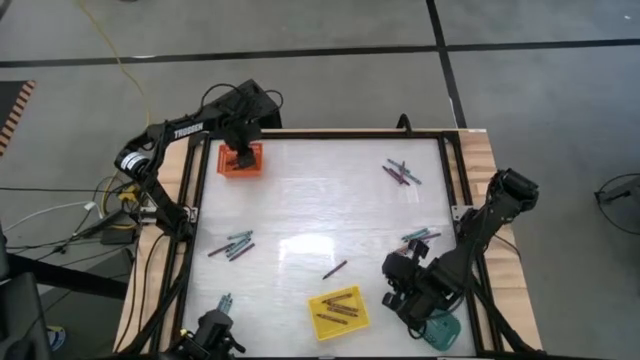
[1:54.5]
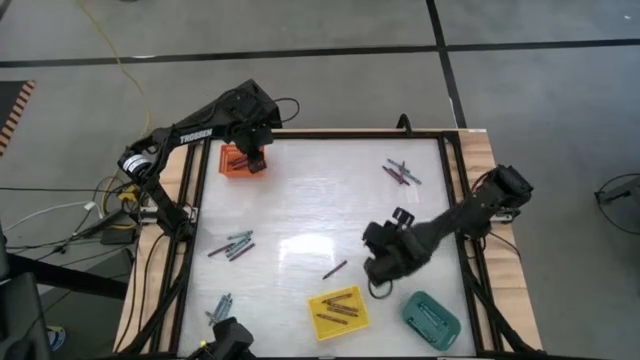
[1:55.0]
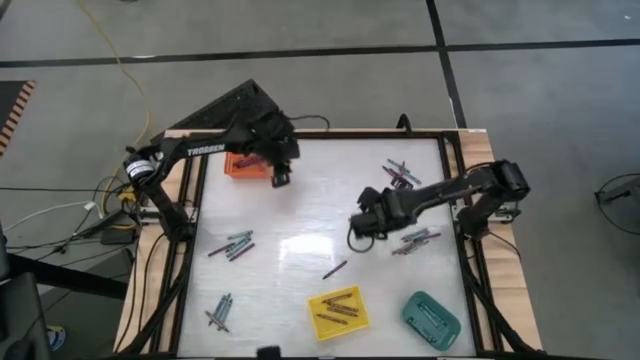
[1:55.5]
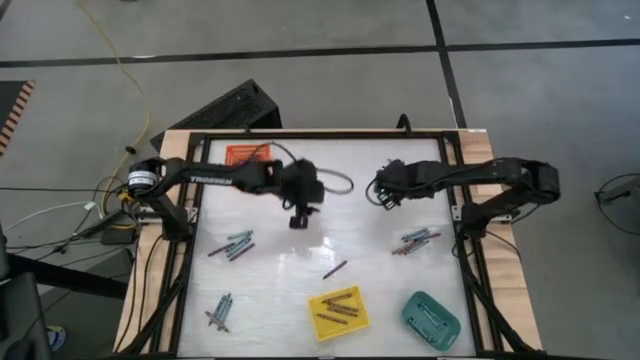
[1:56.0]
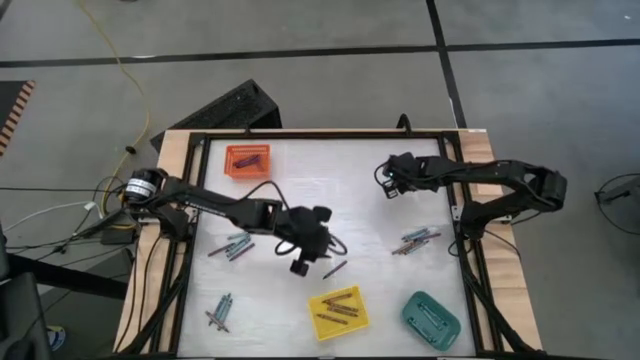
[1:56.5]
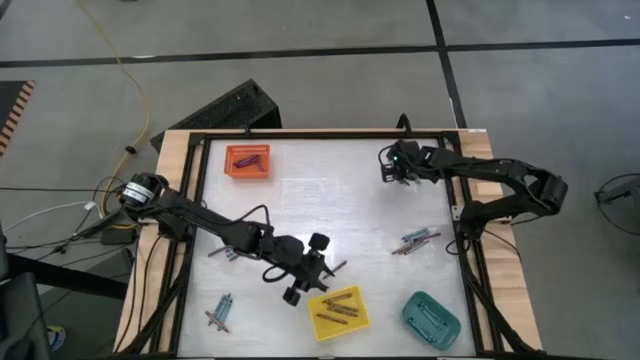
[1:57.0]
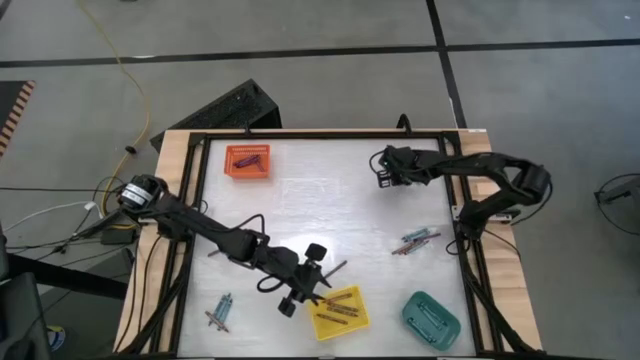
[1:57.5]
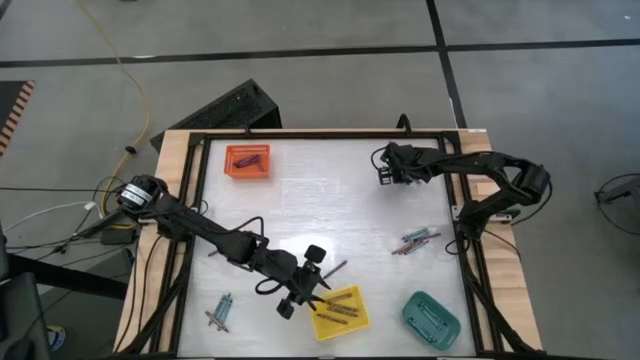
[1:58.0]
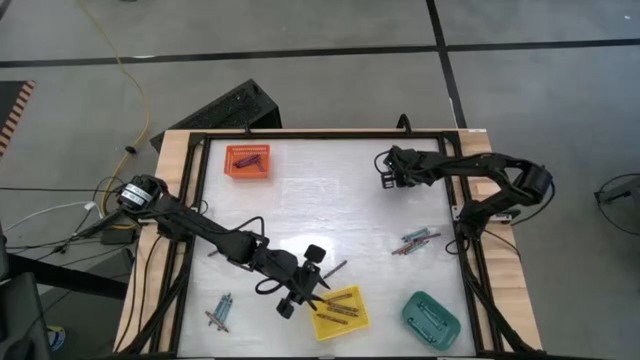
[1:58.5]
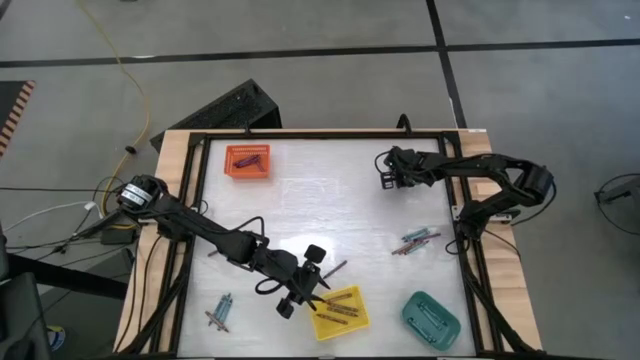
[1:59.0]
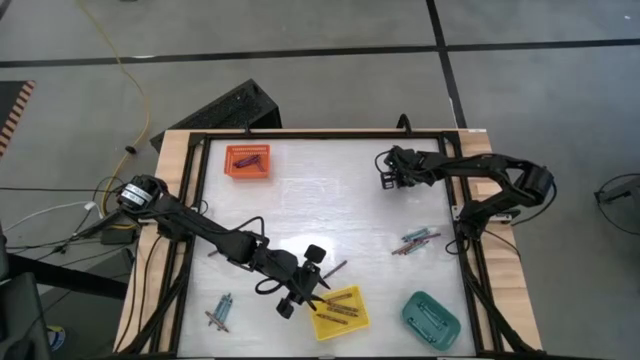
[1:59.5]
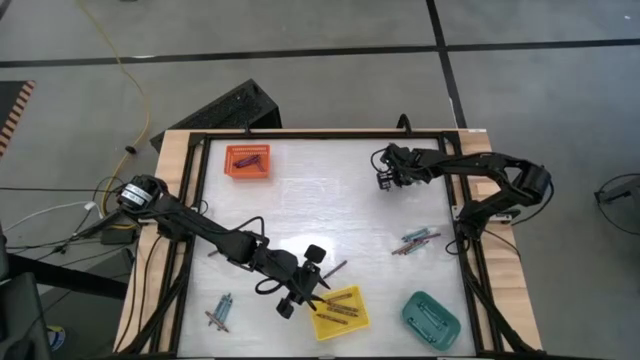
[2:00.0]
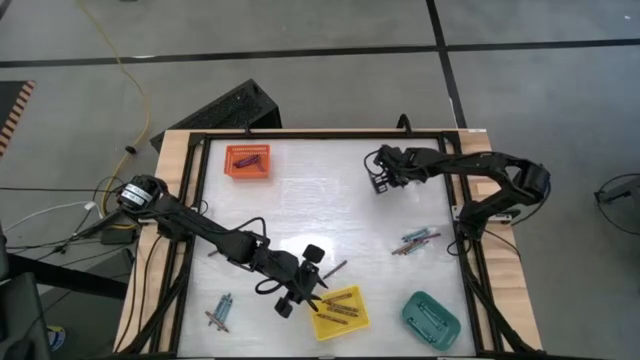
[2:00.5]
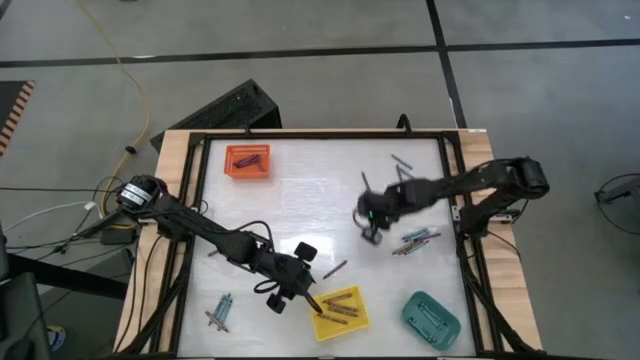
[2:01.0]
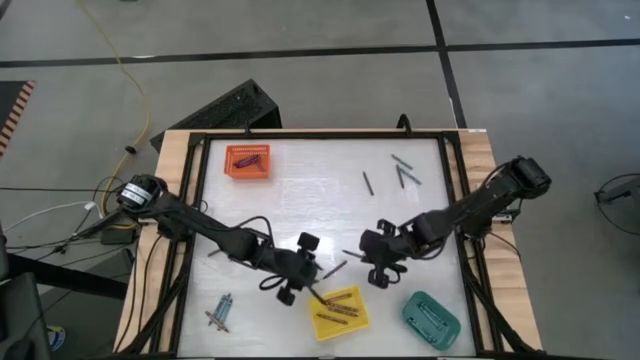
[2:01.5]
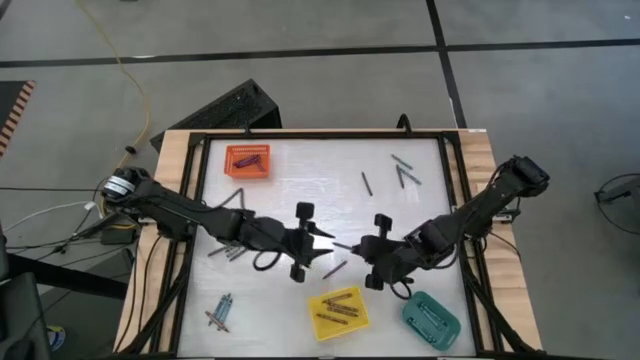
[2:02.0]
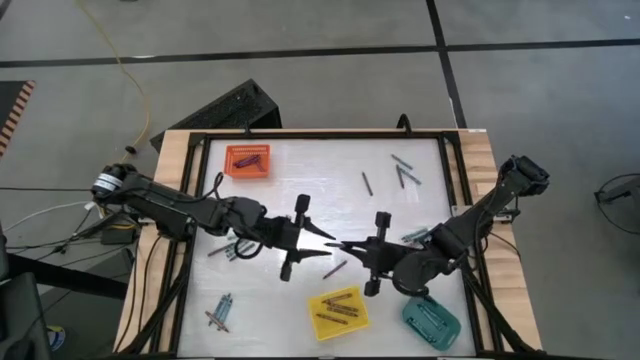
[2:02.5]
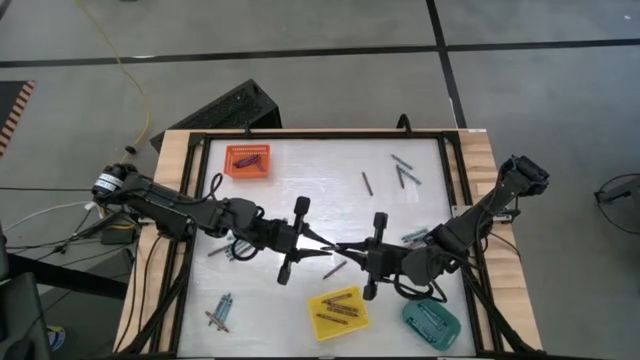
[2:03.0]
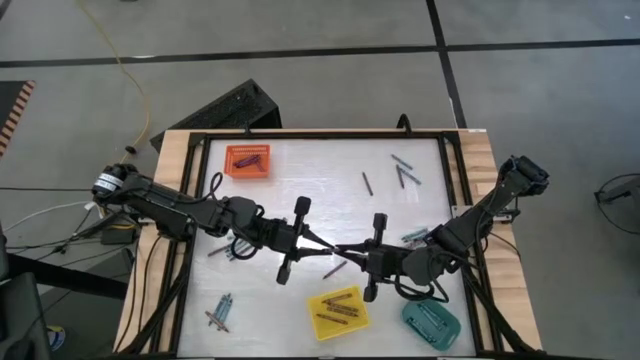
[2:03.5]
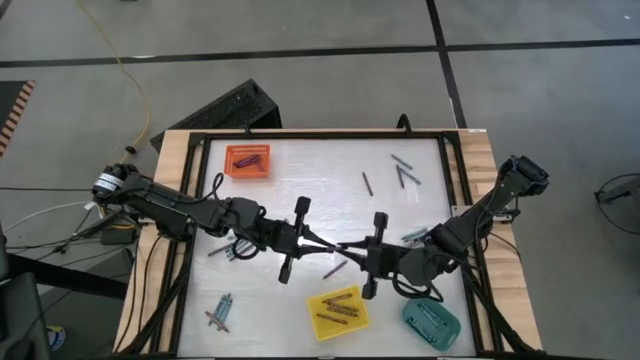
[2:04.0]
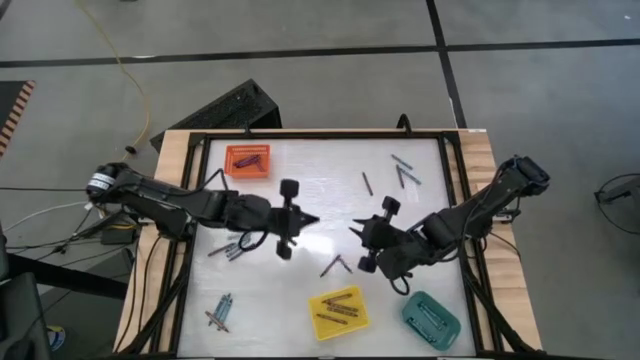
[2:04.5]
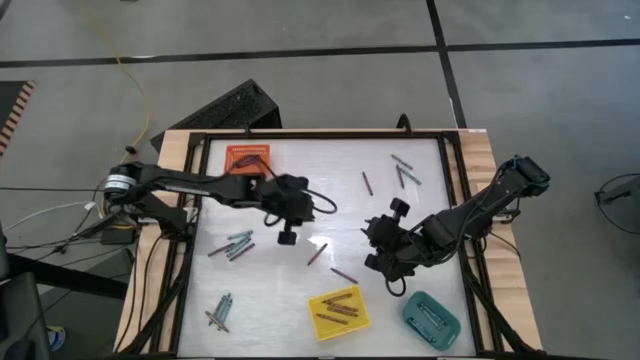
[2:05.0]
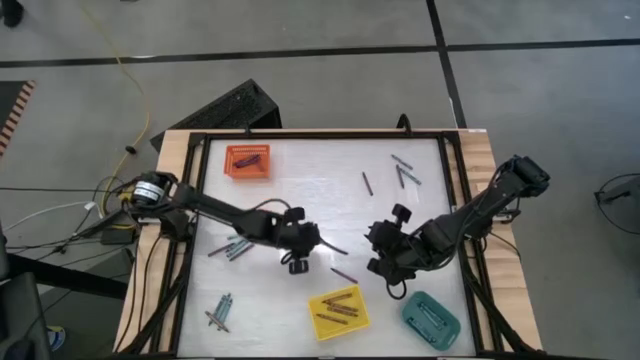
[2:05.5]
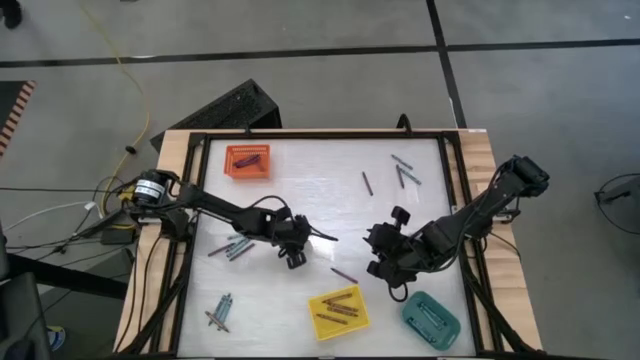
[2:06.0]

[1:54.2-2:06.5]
Task: Sort crayons
Put the purple crayon into the orange bin

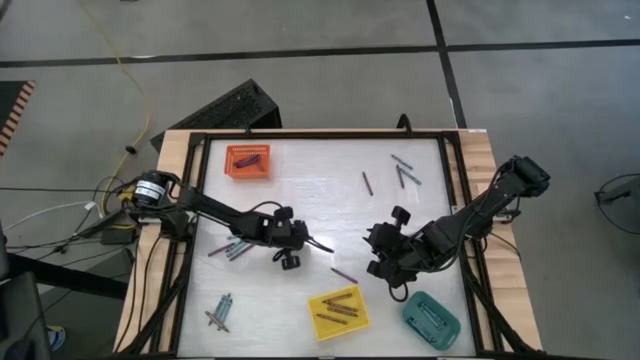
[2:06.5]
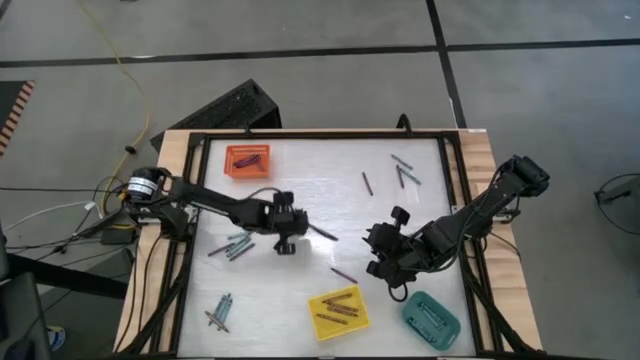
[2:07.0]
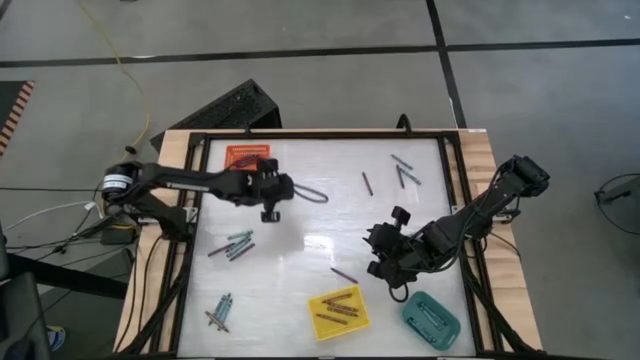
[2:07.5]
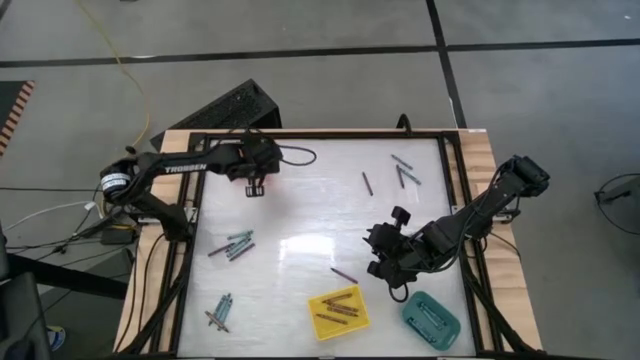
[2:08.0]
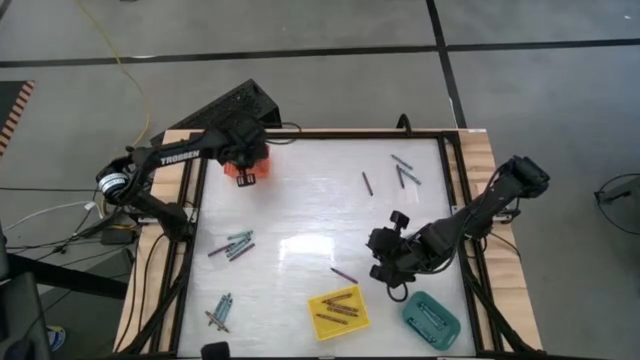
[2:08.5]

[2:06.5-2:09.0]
Put the purple crayon into the orange bin

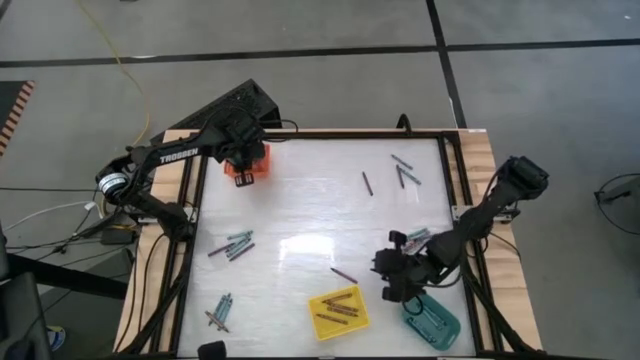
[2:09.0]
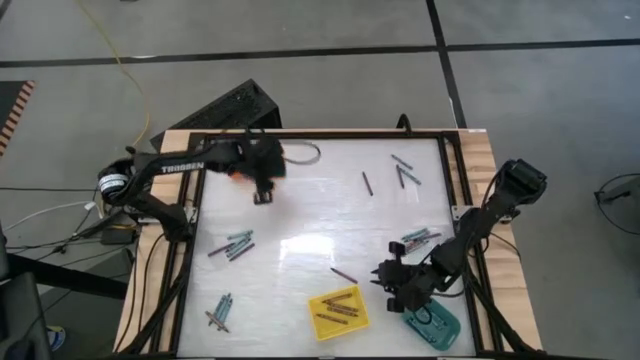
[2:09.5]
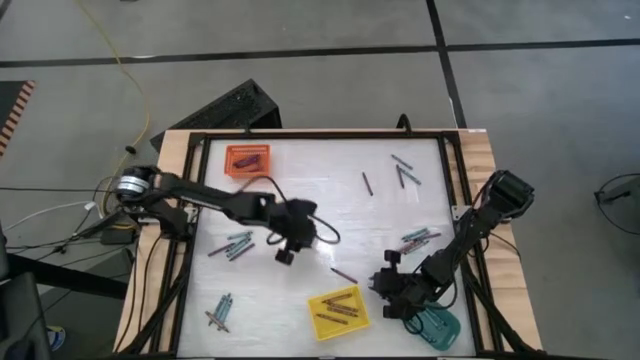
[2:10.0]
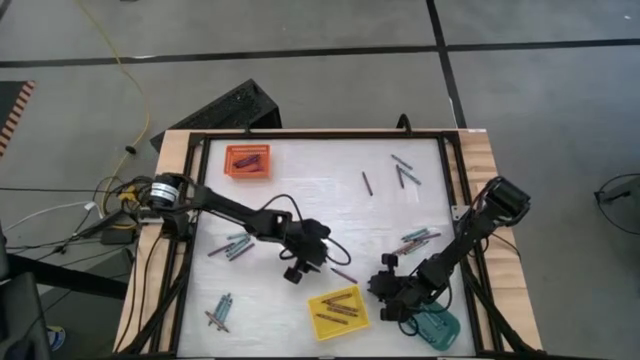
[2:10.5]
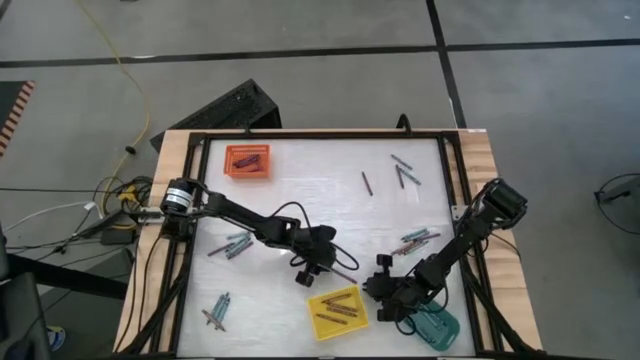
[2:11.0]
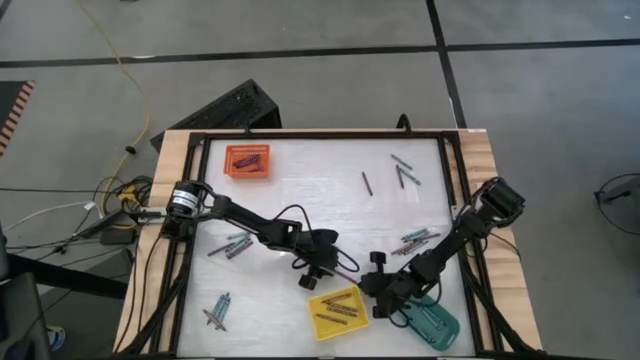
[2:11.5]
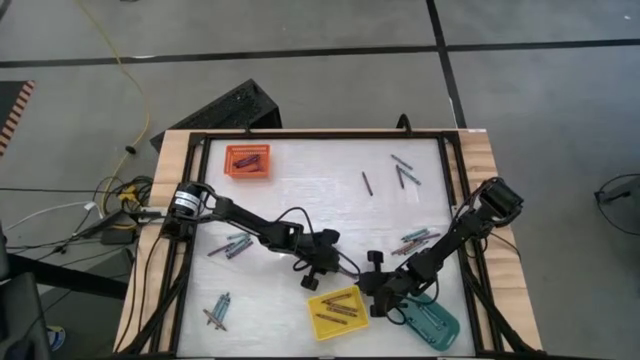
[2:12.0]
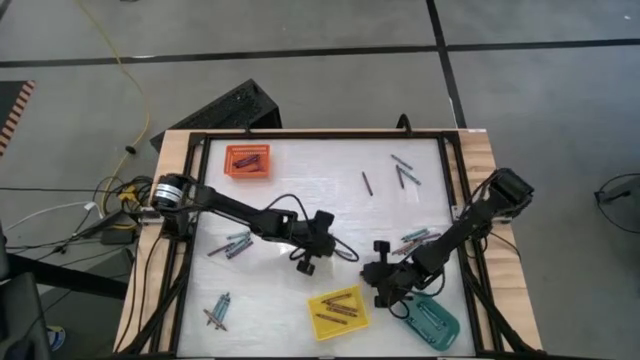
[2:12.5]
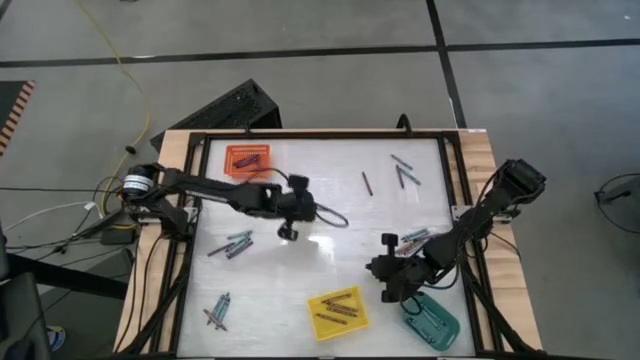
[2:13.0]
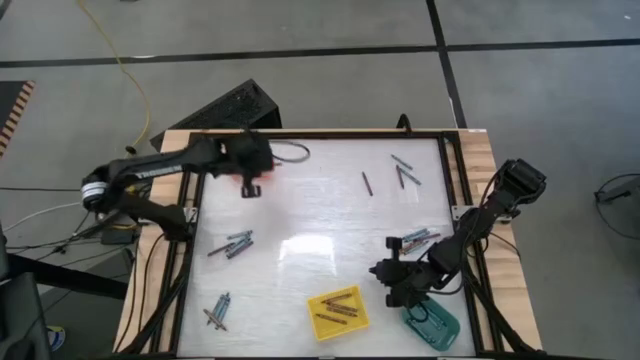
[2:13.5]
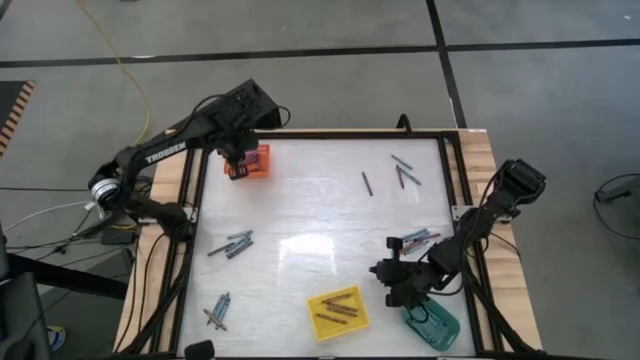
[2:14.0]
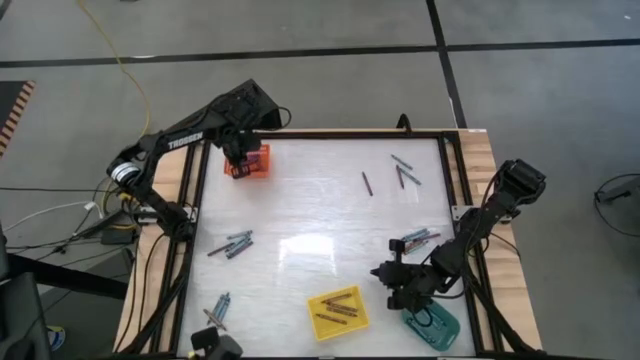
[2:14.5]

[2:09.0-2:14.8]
Put the purple crayon into the orange bin
